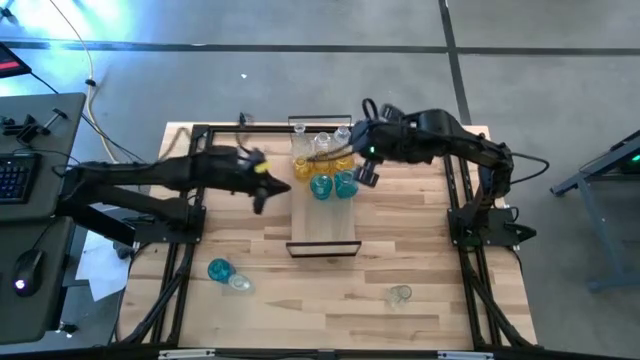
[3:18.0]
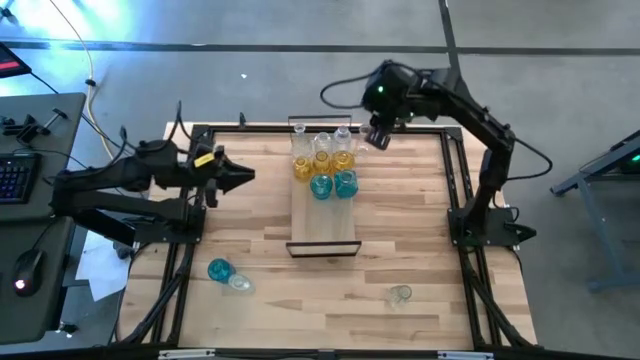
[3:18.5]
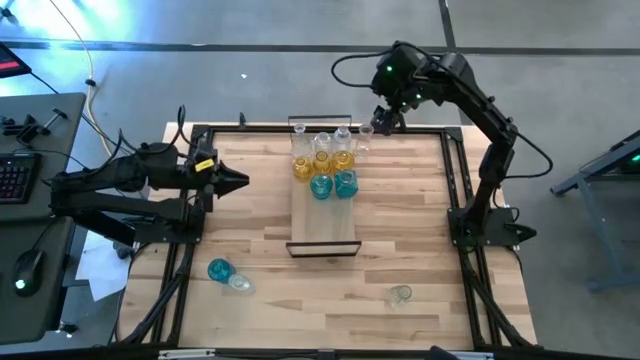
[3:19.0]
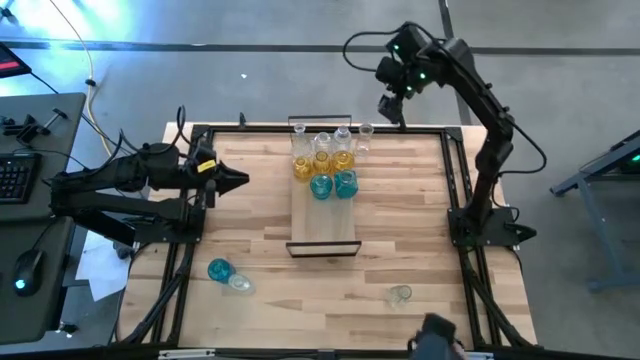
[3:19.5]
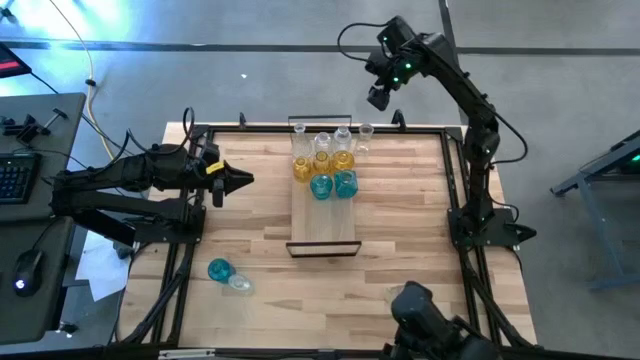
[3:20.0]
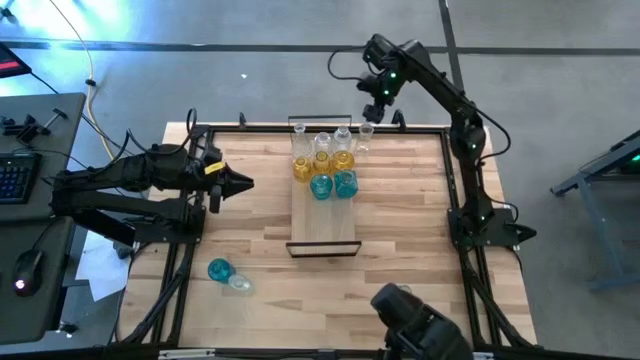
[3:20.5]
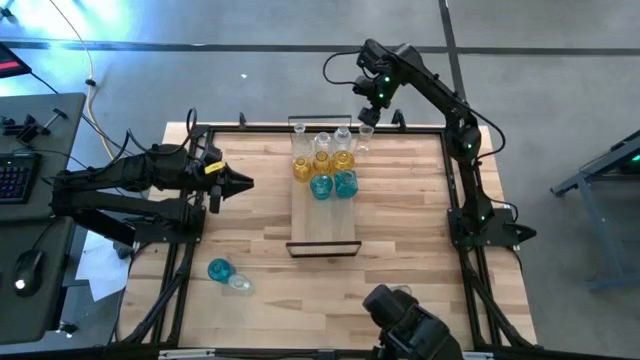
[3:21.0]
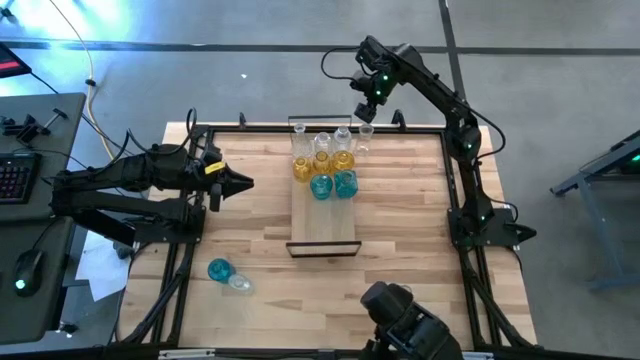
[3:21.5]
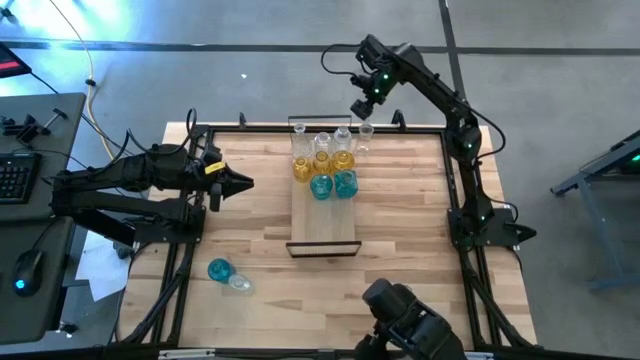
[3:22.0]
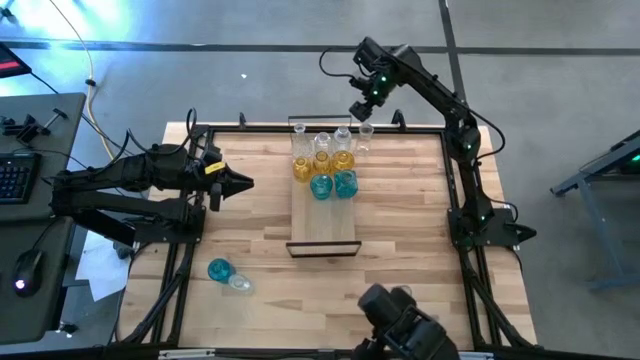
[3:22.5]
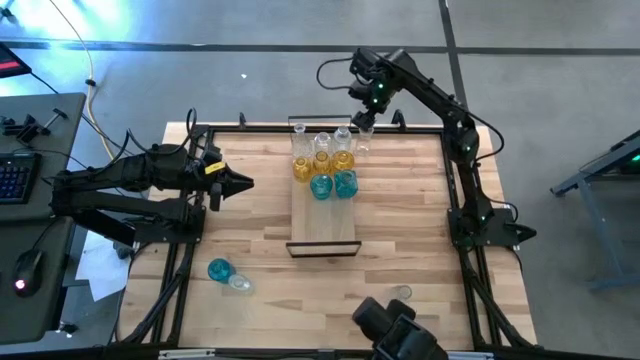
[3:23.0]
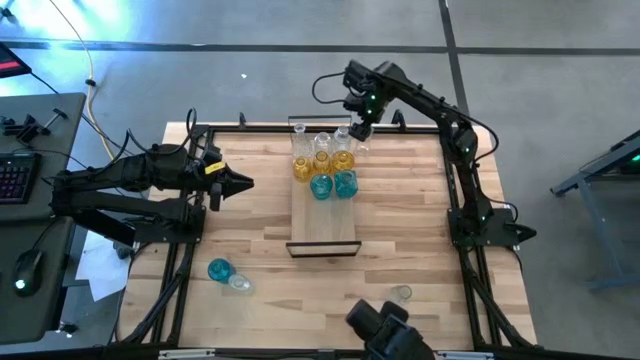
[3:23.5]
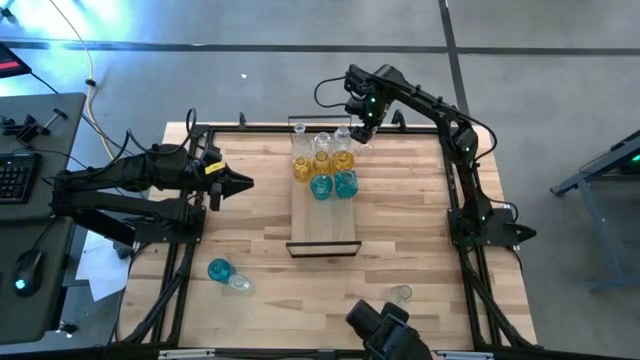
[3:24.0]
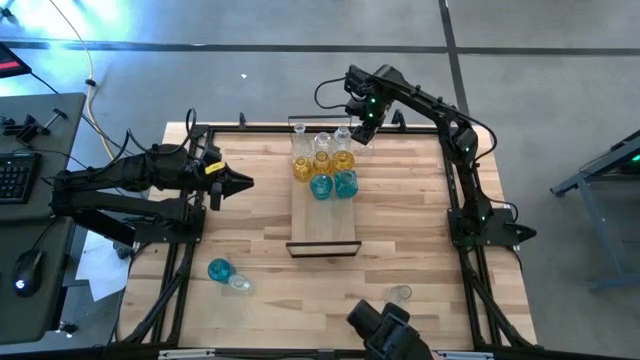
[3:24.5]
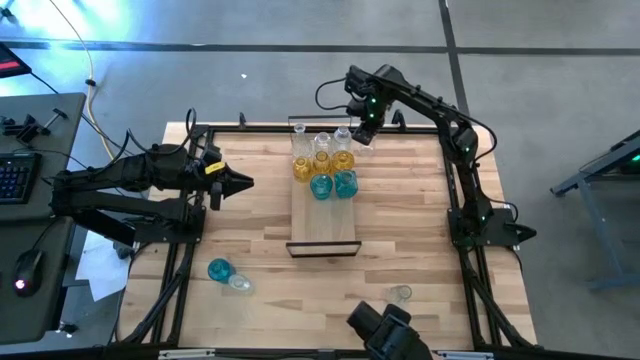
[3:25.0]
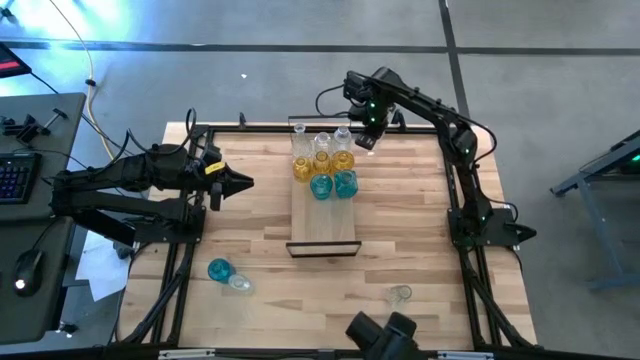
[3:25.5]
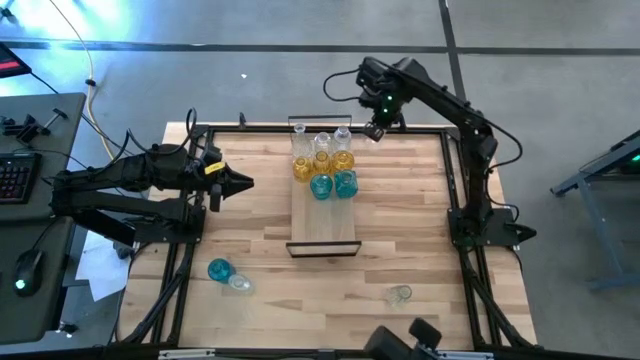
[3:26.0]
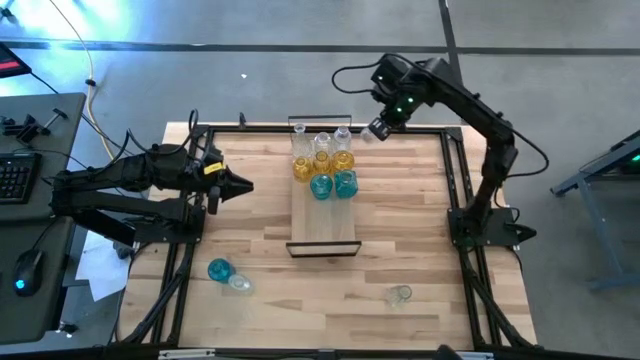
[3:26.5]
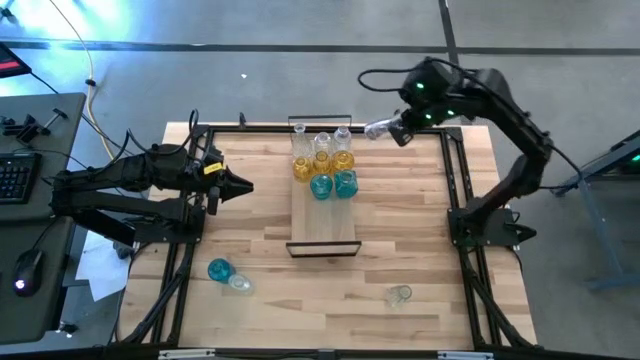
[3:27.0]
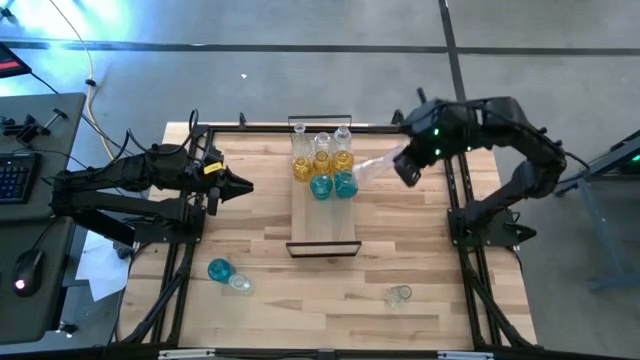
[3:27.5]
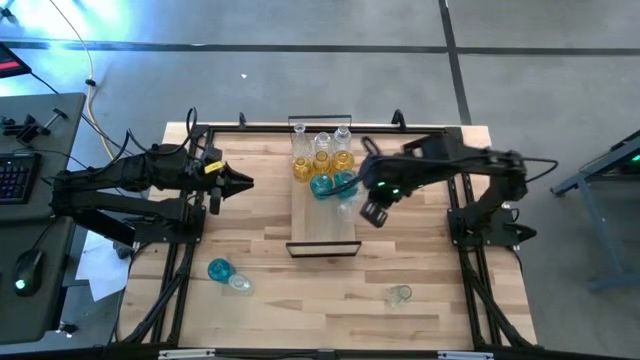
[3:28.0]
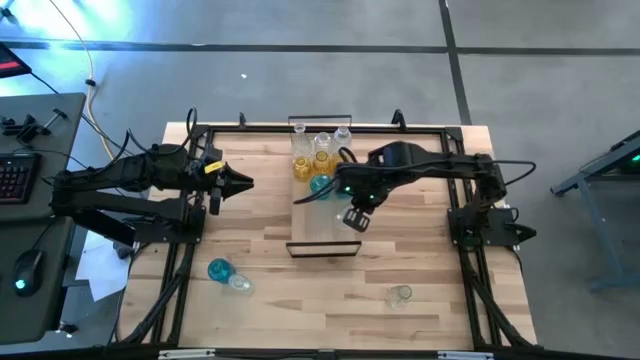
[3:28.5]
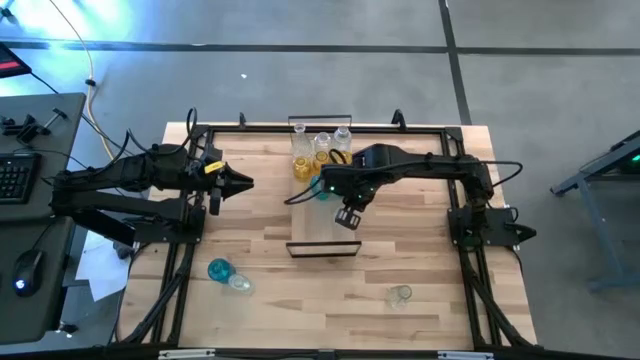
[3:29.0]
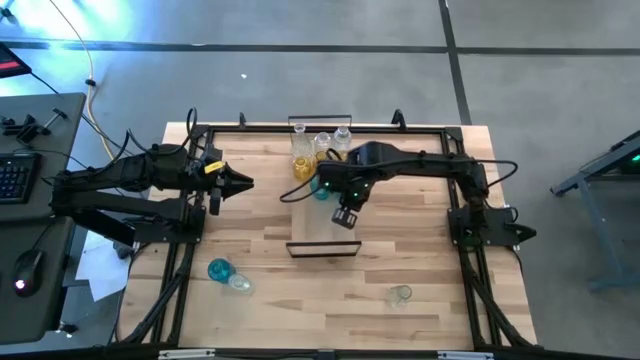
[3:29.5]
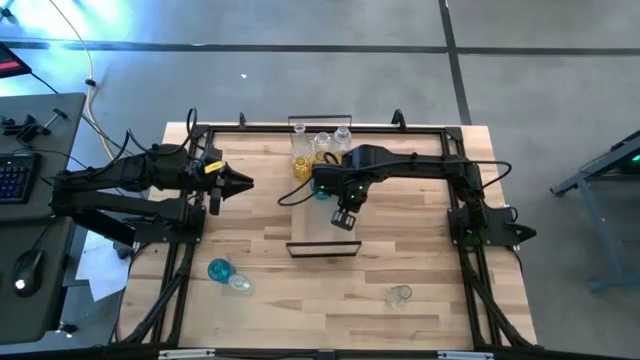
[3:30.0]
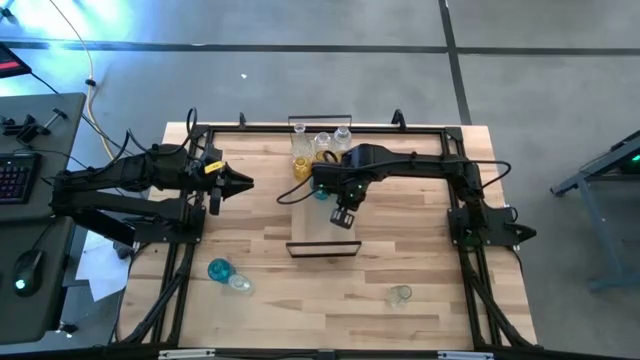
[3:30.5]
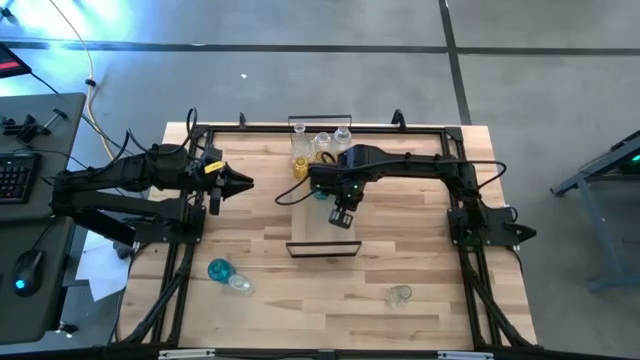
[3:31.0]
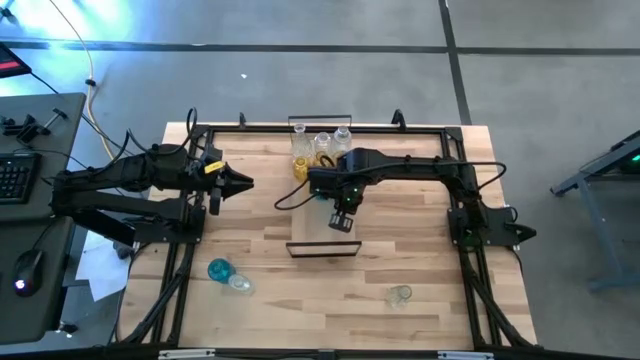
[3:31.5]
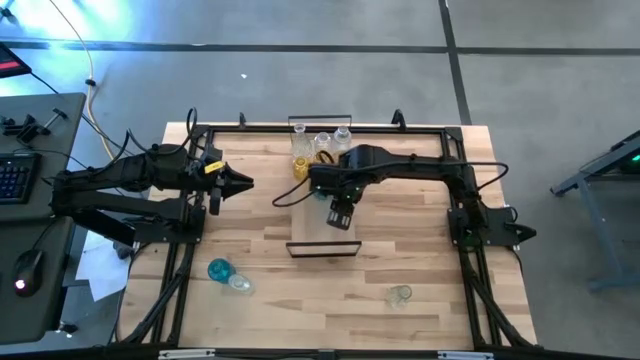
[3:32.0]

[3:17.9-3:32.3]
Task: sort vases onto shelf
Put the top transparent flower vase on the shelf

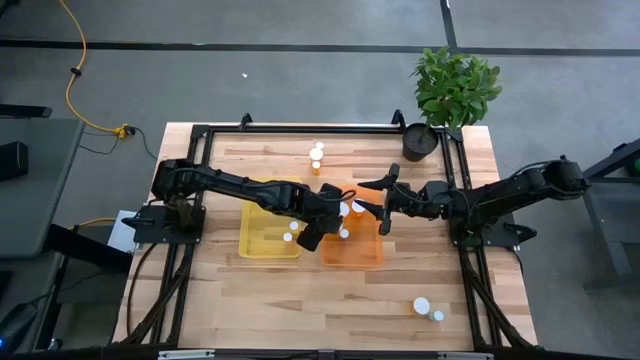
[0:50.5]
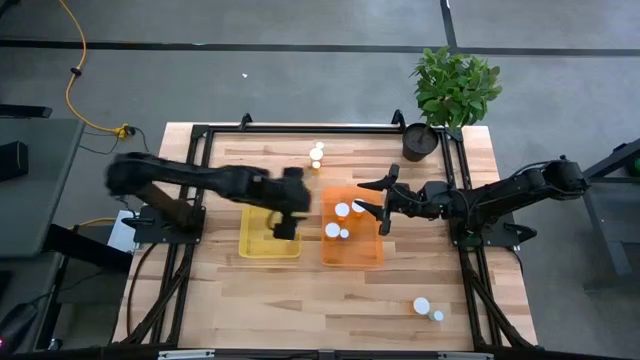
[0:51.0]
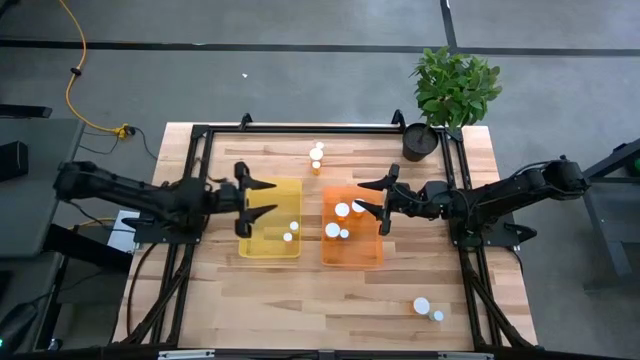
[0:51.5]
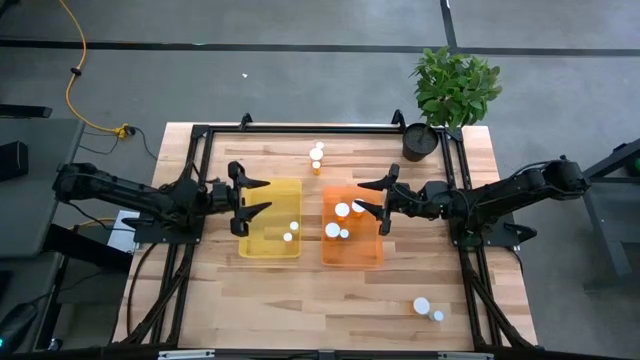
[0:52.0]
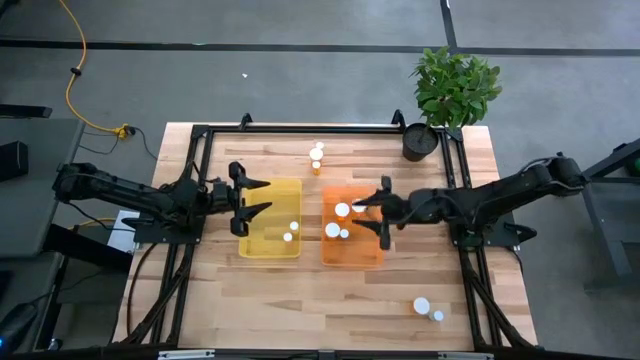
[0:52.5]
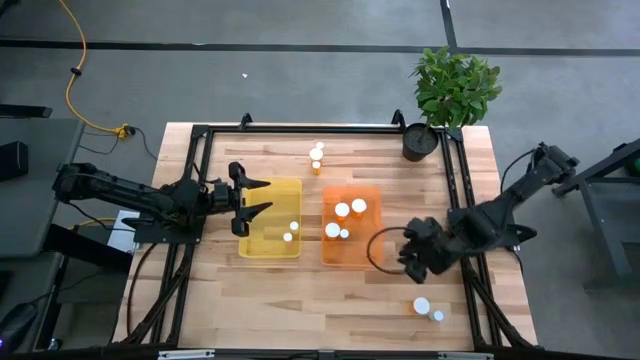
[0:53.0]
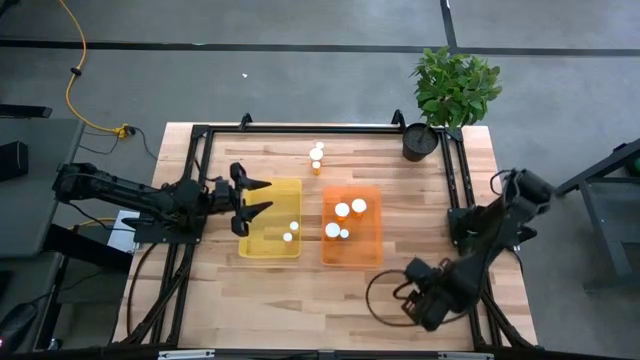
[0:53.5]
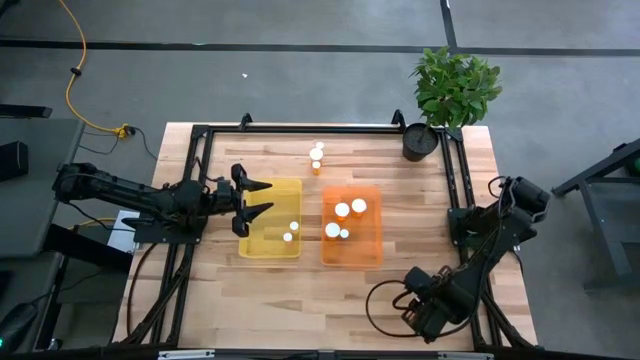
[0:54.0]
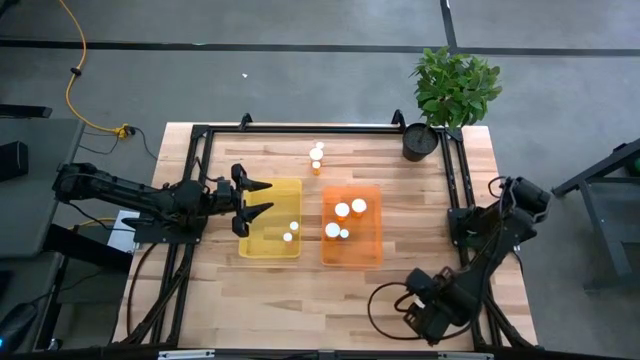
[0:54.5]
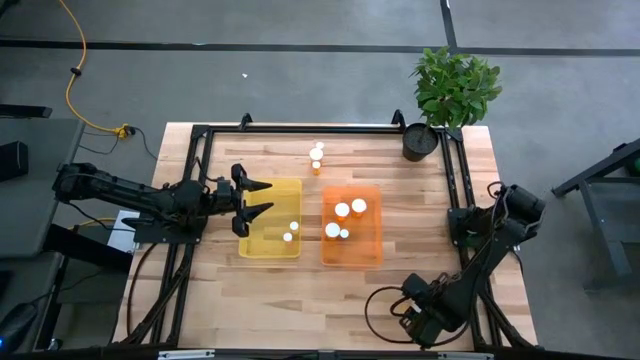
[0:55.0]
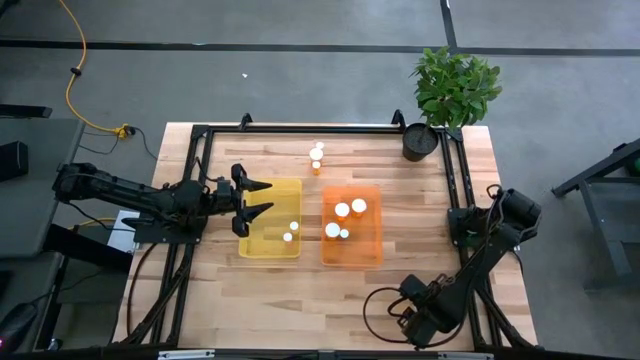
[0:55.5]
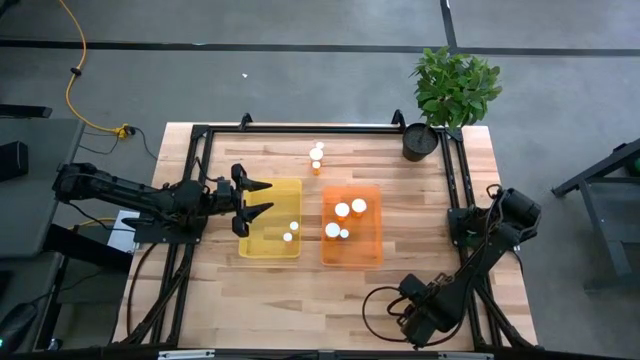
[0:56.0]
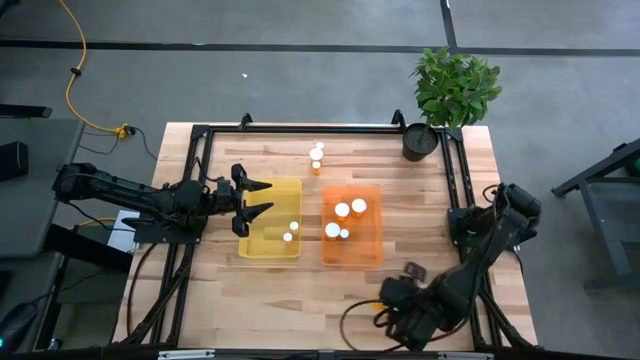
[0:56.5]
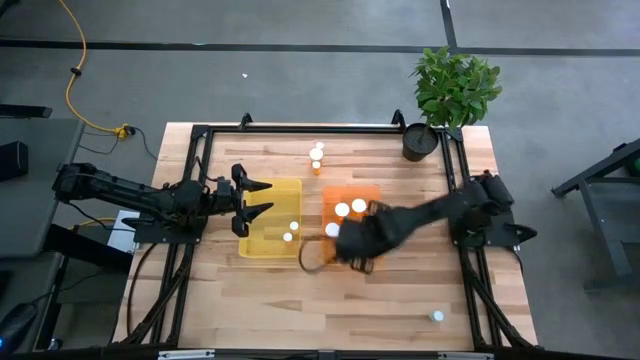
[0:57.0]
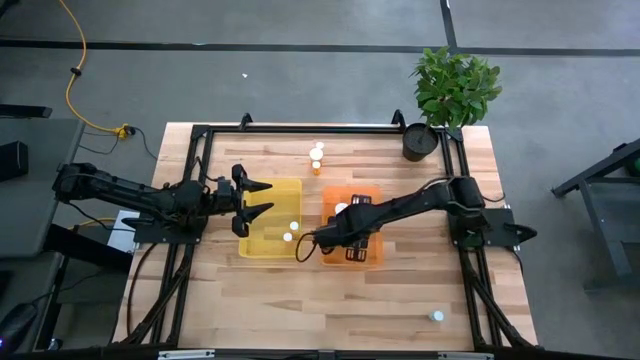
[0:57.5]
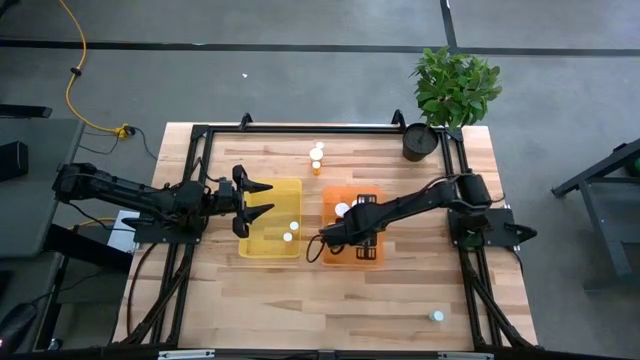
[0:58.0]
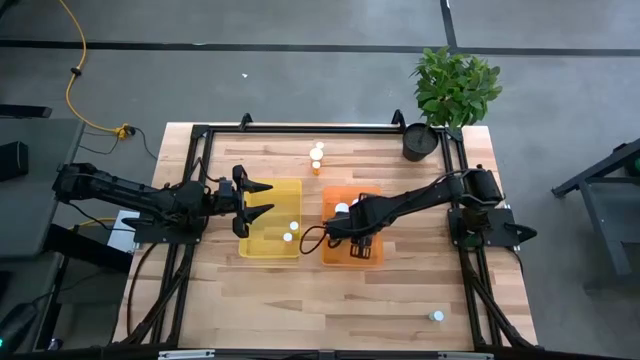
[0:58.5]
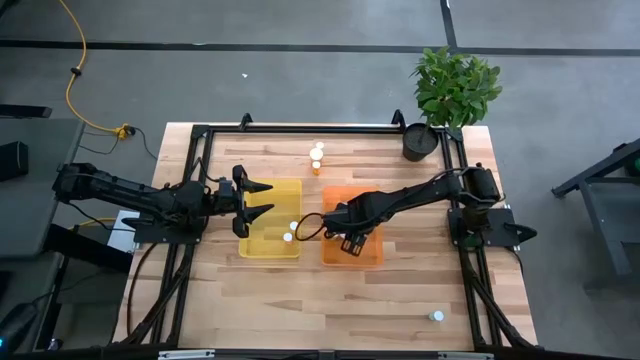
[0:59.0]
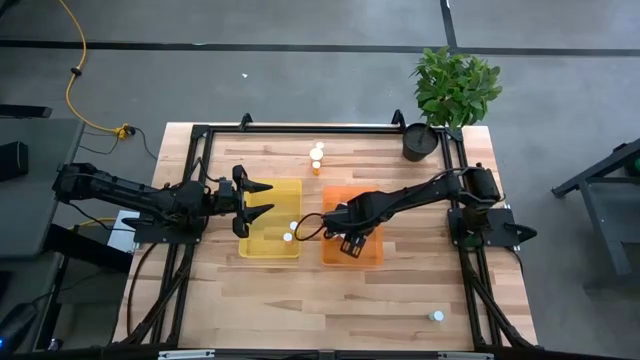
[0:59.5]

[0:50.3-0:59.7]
Task: Pick and place medicine bottles into bin by pill shape (circle, oval)
Put the Orange bottle pill into the orange bin
